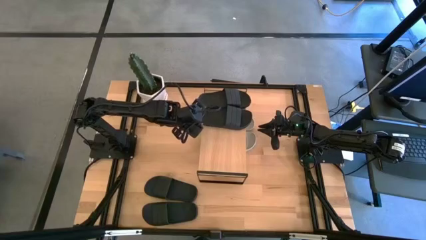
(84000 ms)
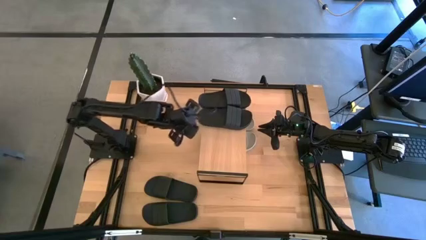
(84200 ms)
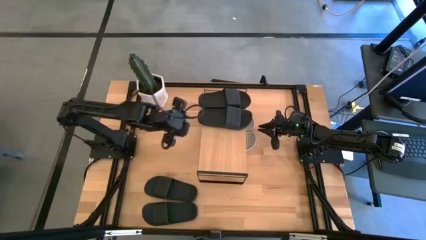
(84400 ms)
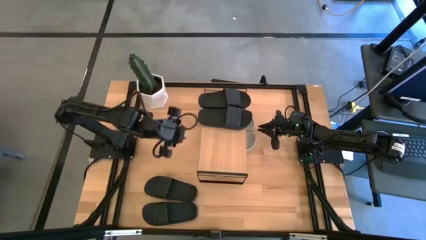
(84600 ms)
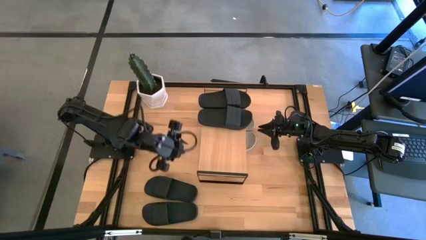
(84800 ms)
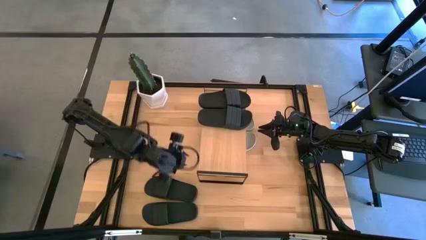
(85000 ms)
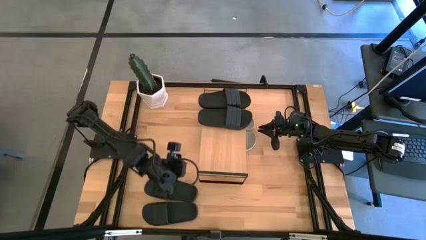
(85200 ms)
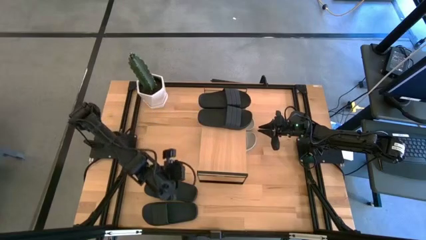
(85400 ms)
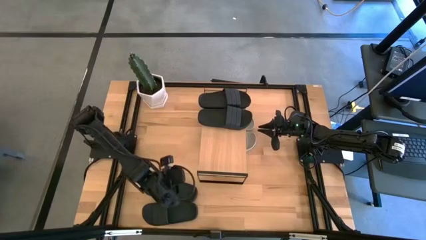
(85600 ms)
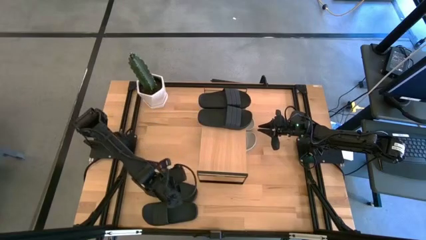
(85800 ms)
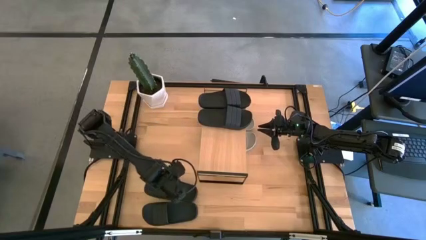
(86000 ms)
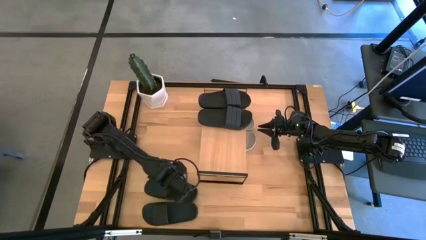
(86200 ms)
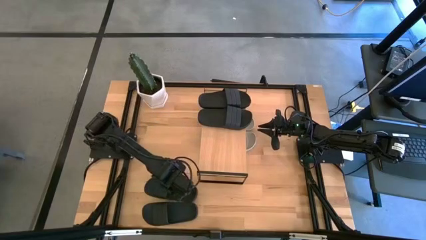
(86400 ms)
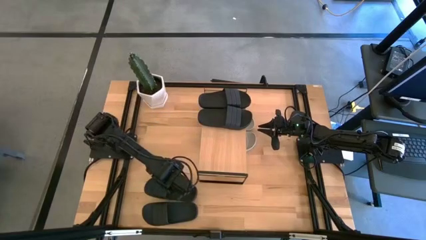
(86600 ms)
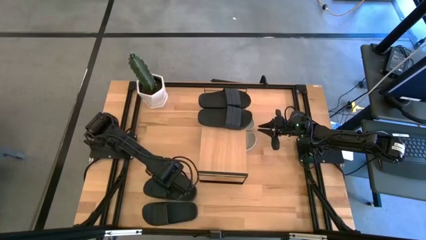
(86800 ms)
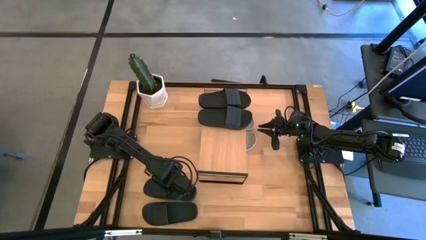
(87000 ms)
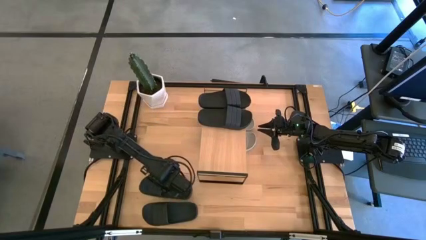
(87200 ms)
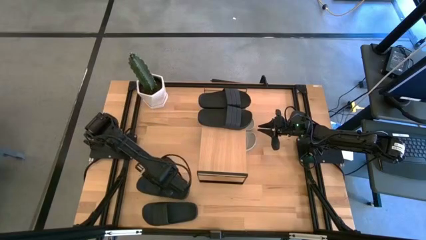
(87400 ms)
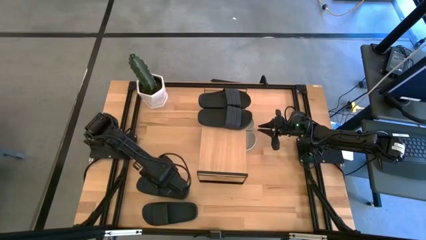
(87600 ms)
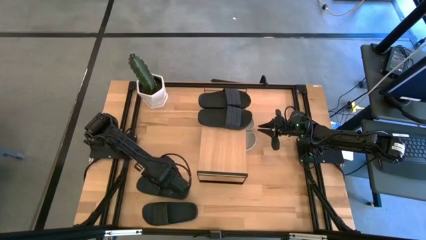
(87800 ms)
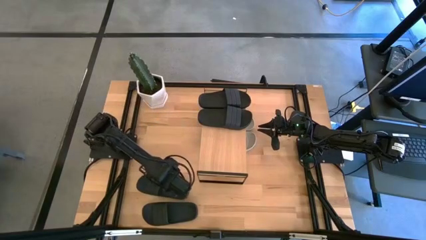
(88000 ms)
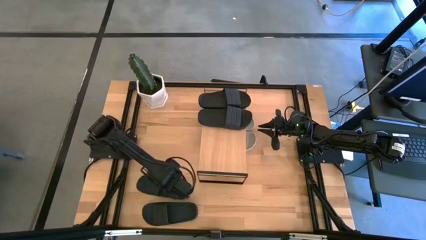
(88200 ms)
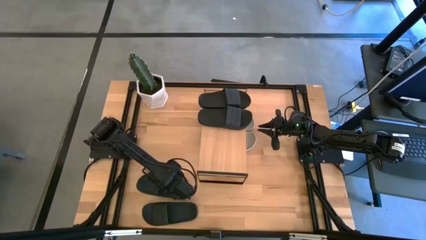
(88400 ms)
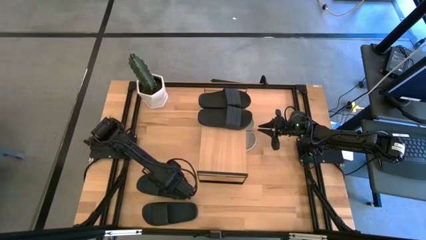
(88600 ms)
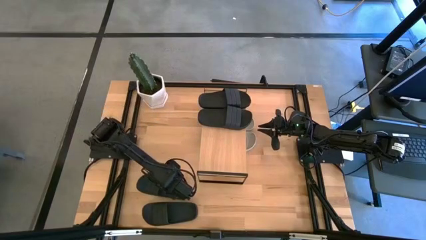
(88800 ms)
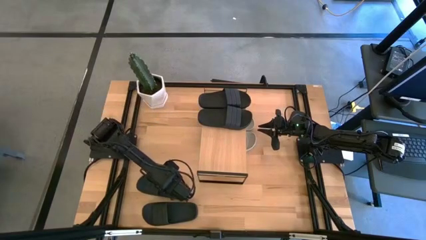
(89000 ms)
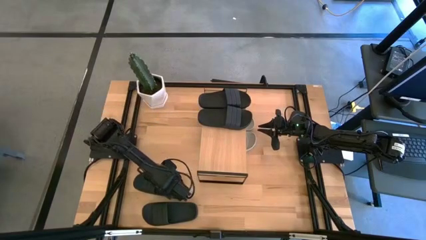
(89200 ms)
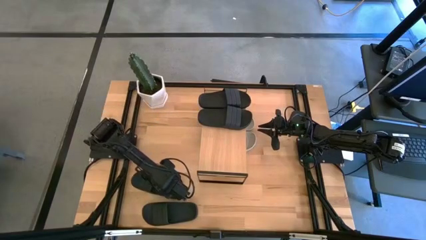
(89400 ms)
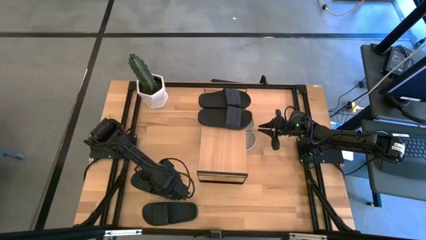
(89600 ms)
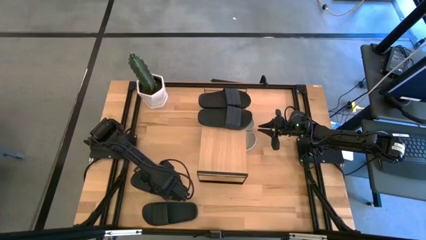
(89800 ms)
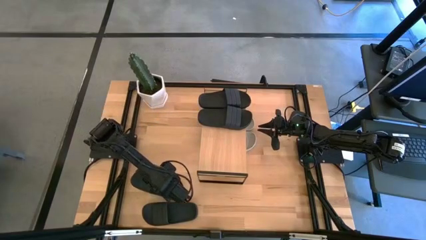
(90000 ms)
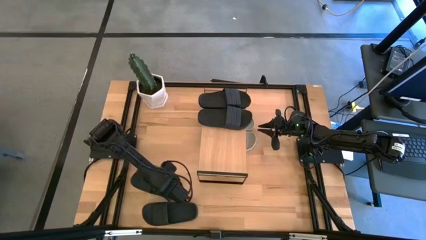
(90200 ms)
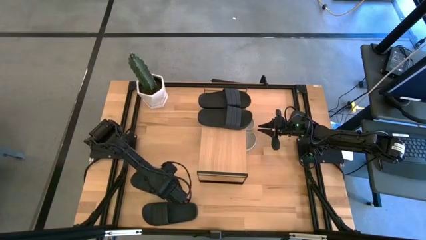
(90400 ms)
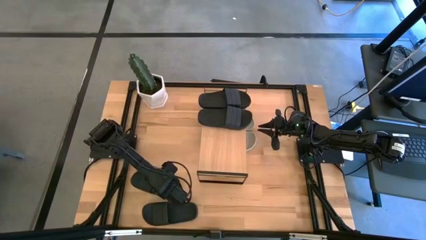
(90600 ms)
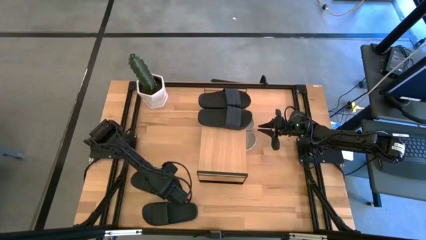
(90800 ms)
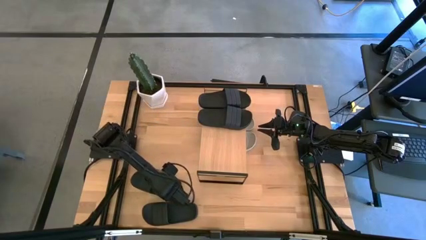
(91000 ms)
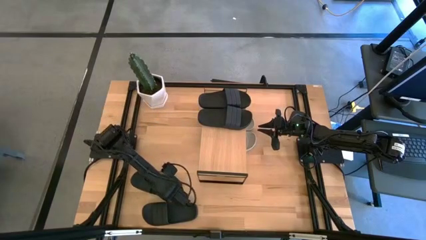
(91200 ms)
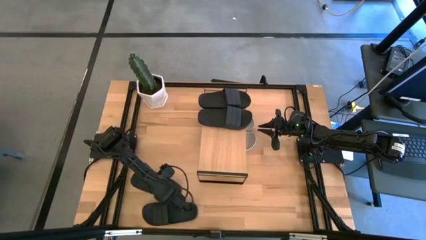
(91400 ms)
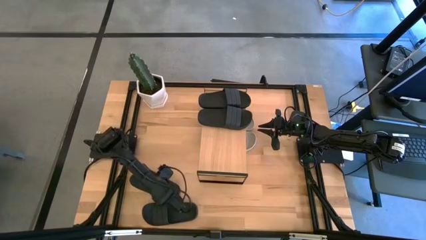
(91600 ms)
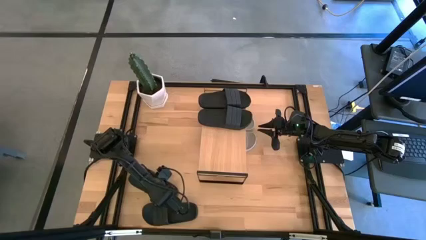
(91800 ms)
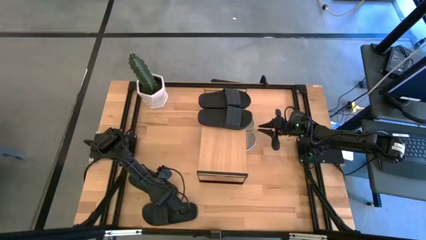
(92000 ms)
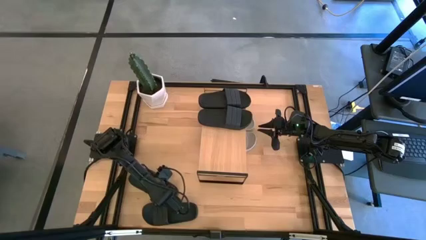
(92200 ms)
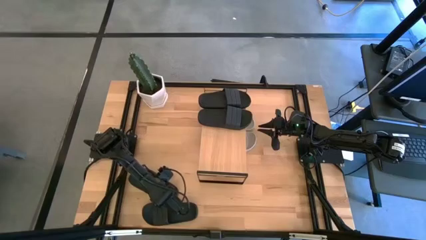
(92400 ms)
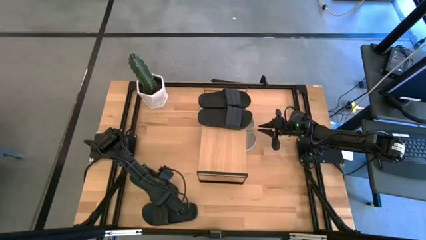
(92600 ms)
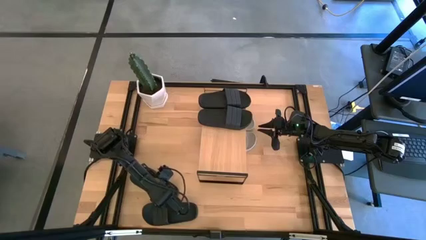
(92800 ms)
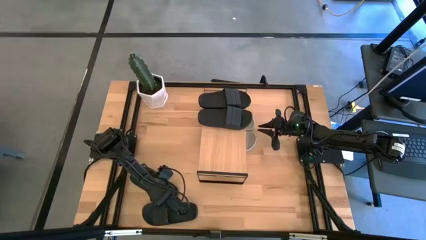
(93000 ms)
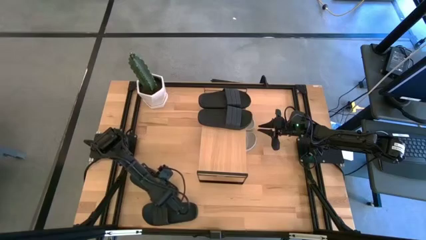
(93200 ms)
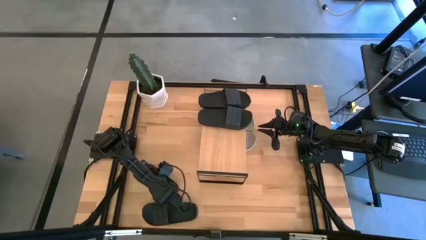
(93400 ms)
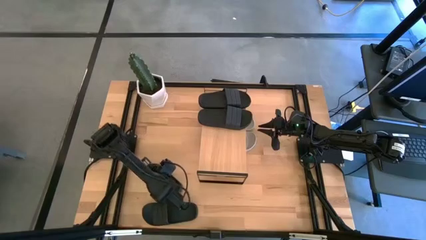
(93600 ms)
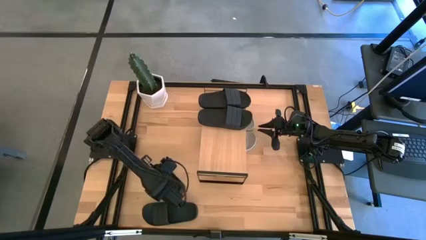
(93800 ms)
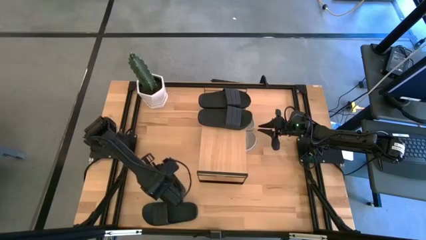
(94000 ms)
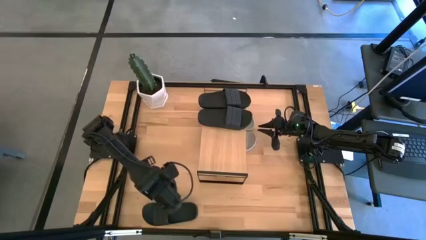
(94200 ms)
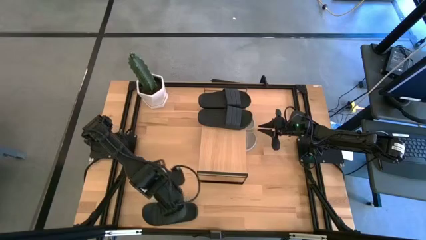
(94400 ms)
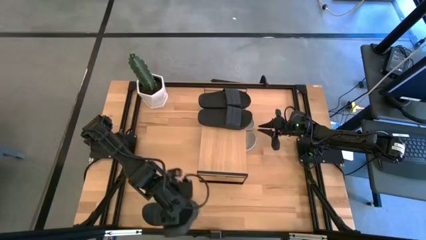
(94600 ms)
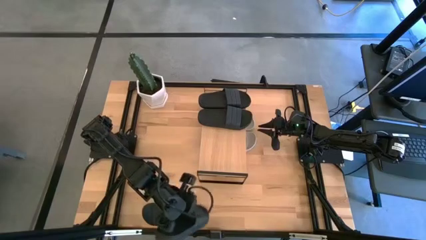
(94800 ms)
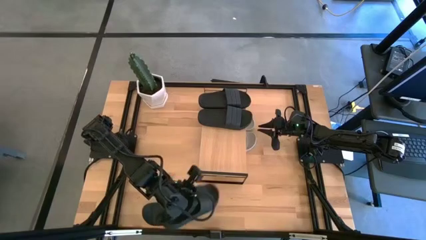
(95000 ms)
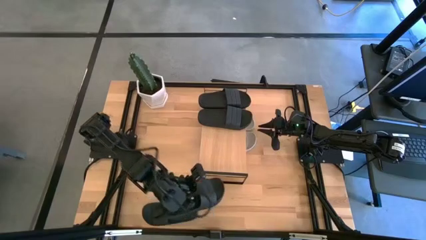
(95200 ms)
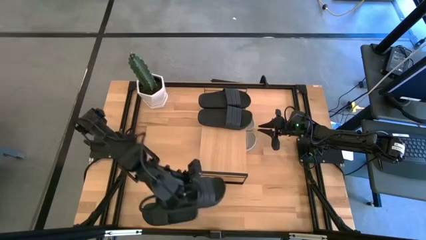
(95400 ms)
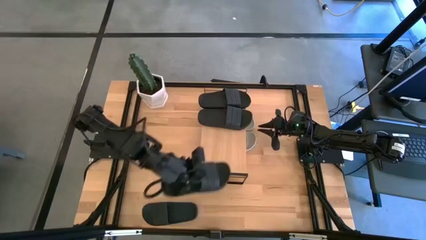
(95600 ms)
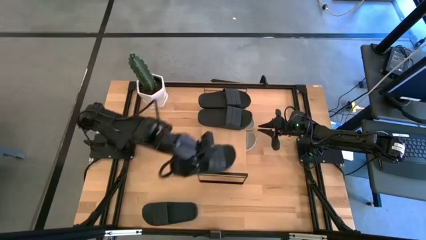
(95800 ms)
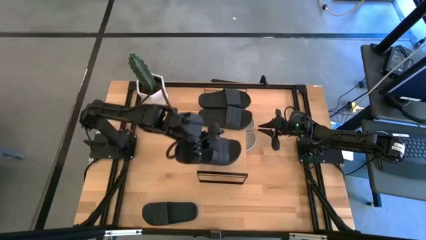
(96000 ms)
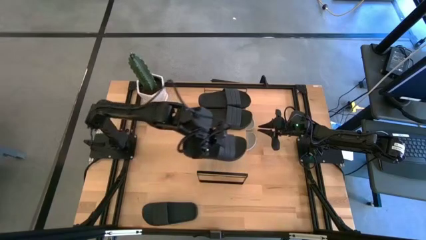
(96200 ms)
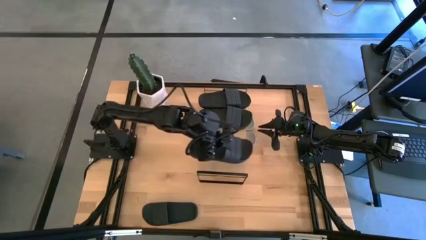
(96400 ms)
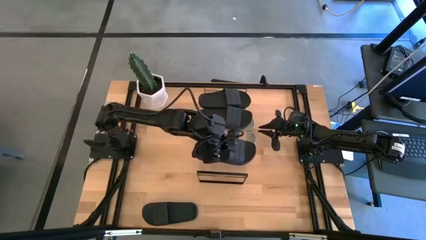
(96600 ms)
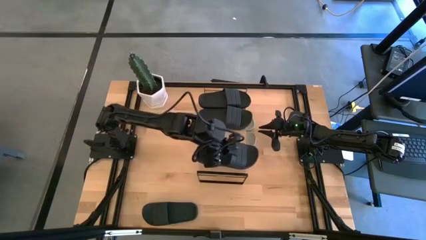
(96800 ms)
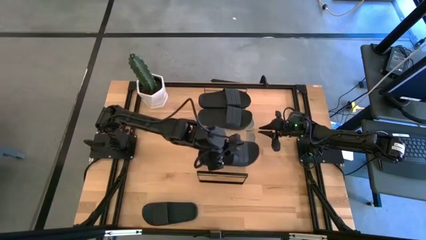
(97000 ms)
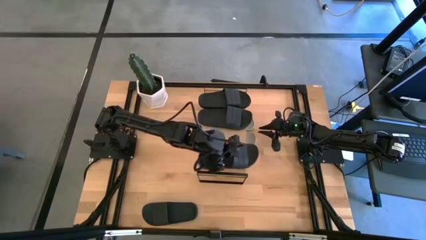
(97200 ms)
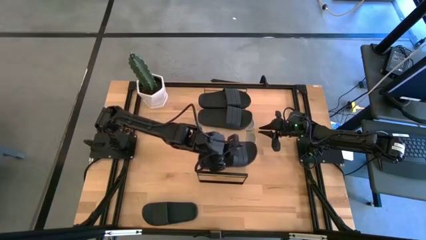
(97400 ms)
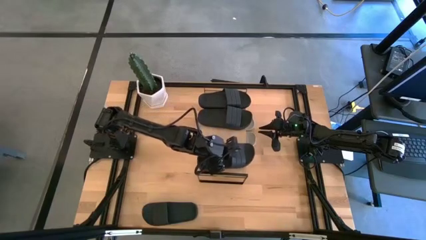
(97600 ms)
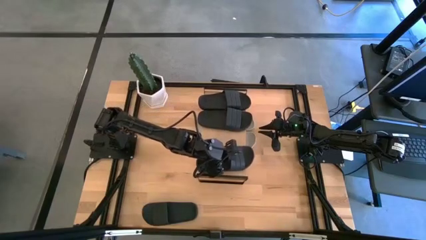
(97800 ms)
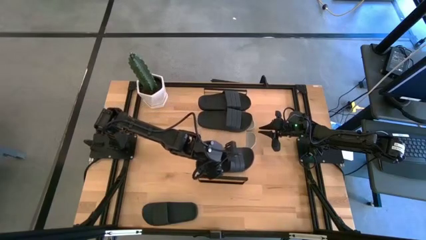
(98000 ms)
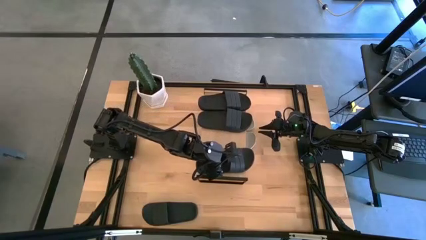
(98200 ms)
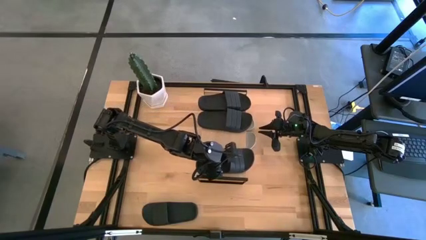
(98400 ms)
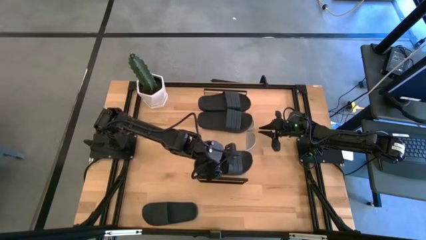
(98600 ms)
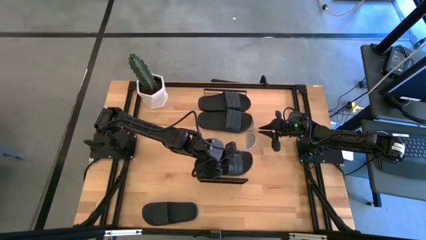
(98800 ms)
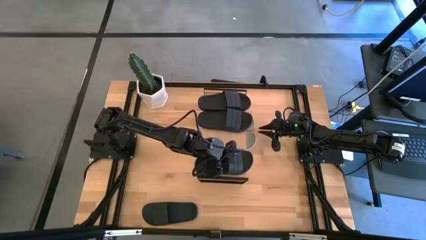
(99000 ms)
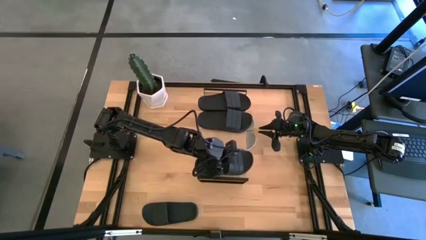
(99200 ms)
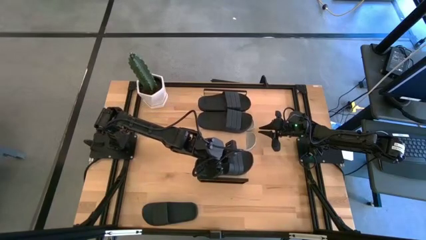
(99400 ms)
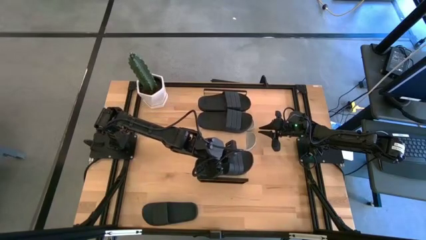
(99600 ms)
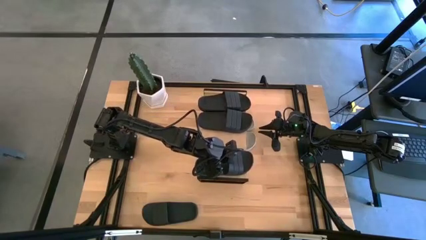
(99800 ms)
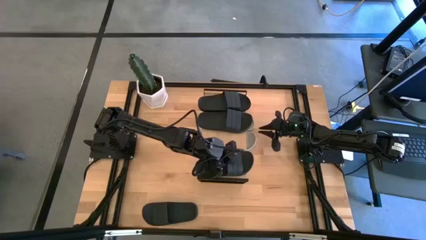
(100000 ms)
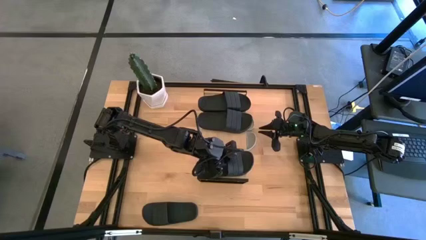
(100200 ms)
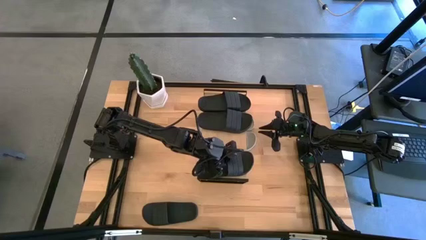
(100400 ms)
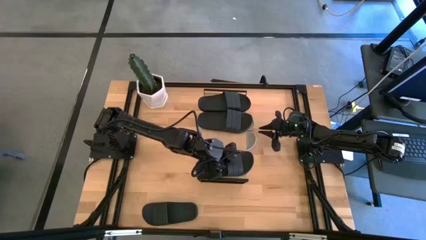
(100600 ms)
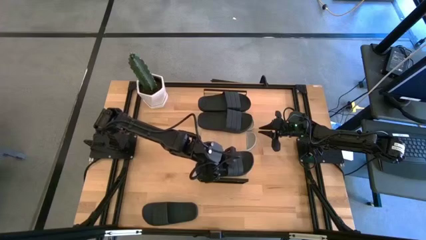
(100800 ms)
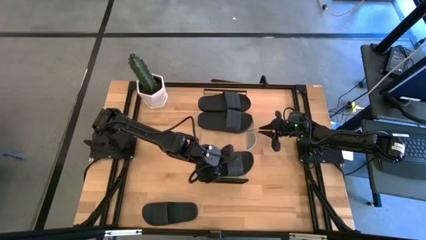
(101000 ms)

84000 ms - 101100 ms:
Task: Pick and place slides into the shelf
Put the black slipper on the shelf
